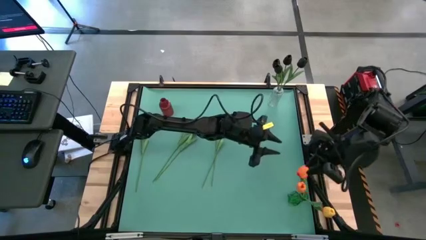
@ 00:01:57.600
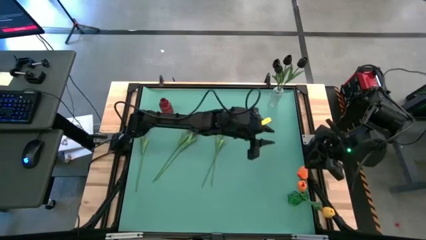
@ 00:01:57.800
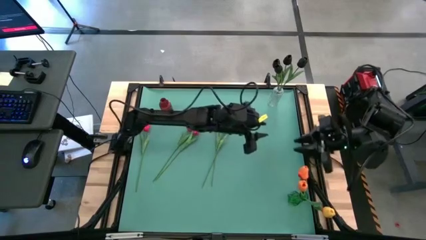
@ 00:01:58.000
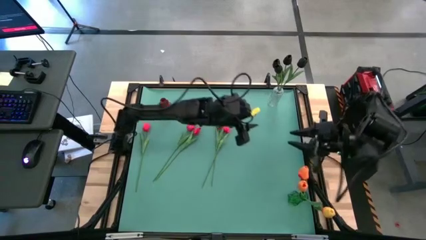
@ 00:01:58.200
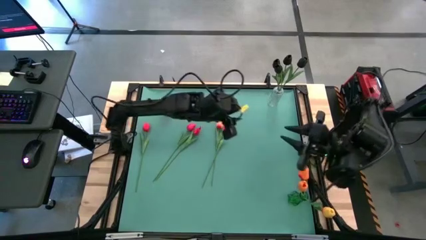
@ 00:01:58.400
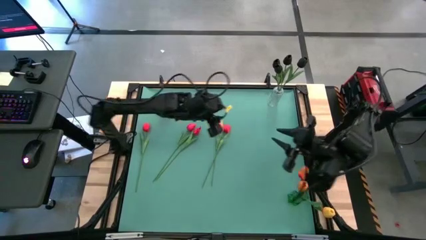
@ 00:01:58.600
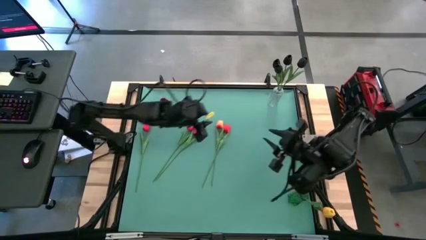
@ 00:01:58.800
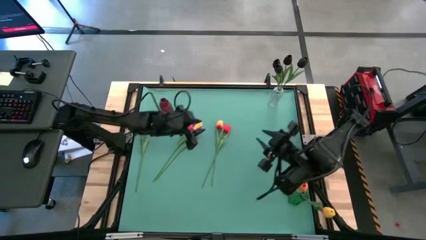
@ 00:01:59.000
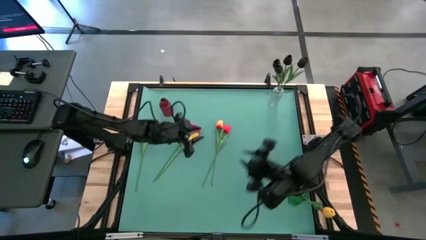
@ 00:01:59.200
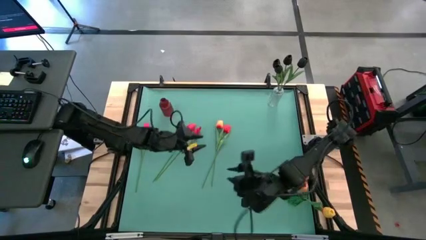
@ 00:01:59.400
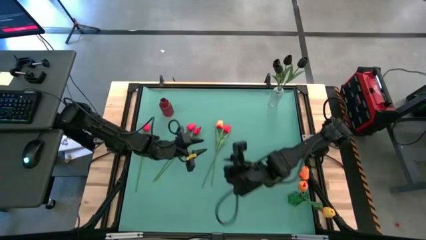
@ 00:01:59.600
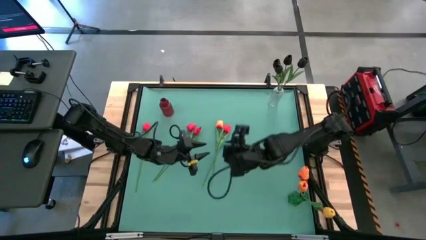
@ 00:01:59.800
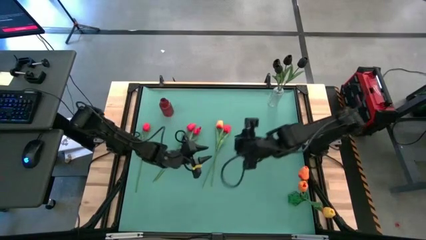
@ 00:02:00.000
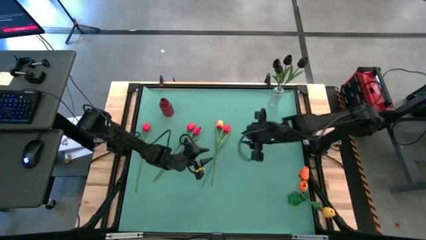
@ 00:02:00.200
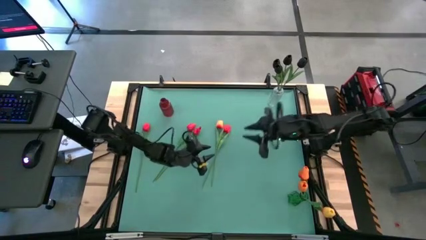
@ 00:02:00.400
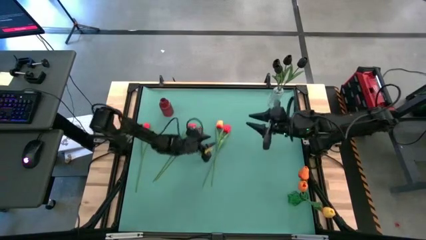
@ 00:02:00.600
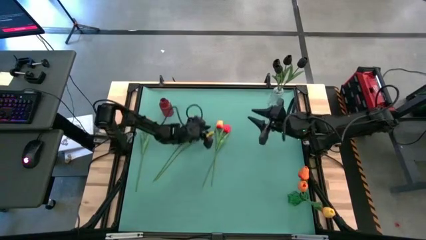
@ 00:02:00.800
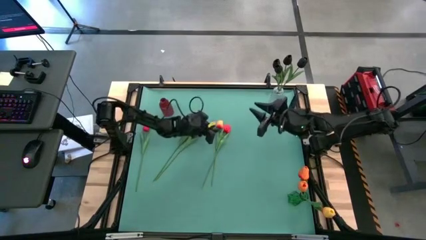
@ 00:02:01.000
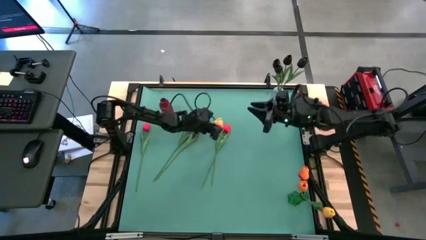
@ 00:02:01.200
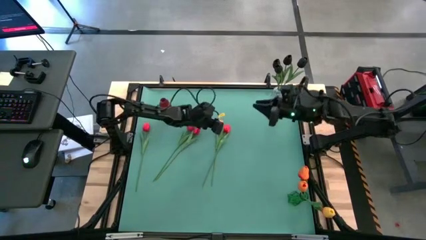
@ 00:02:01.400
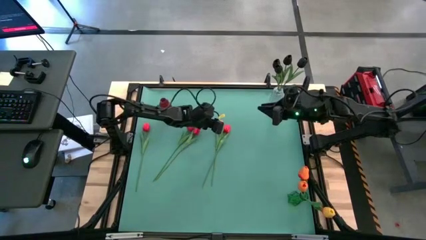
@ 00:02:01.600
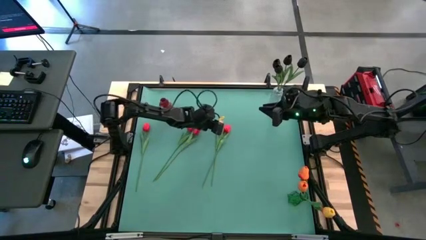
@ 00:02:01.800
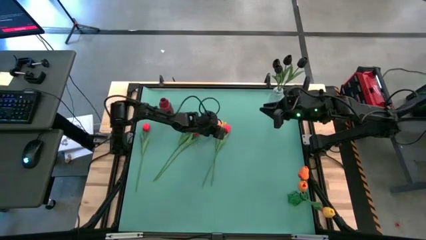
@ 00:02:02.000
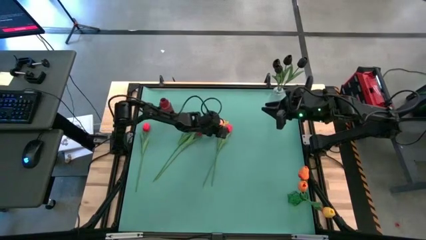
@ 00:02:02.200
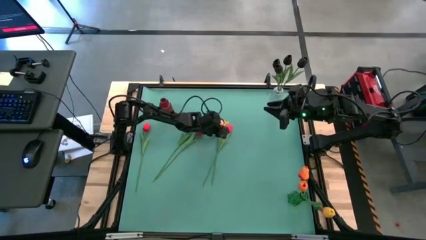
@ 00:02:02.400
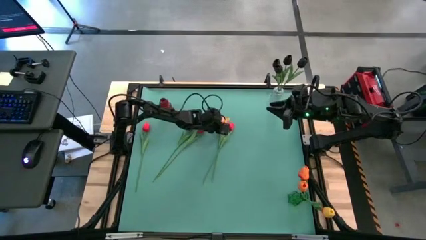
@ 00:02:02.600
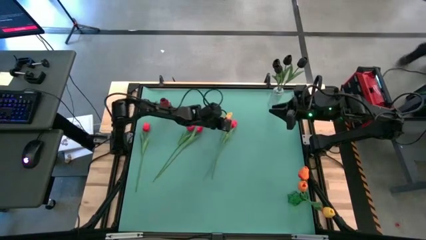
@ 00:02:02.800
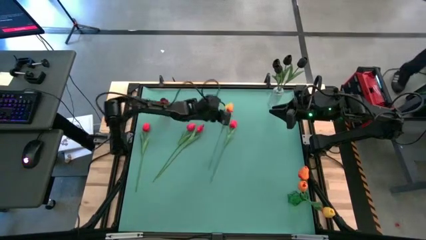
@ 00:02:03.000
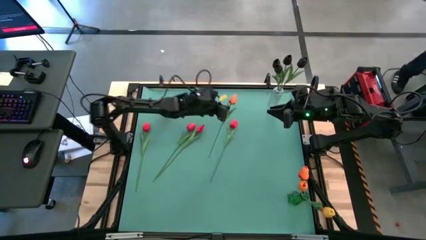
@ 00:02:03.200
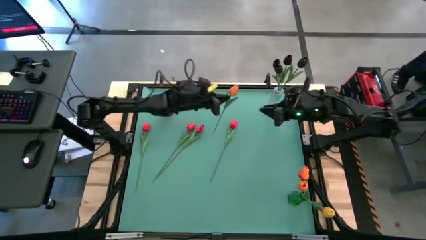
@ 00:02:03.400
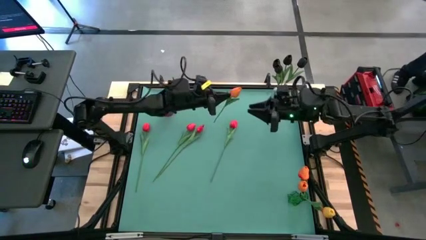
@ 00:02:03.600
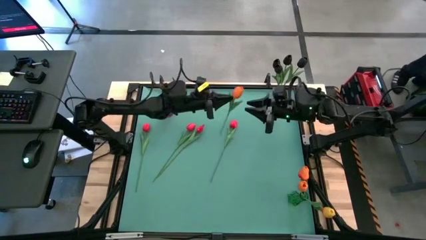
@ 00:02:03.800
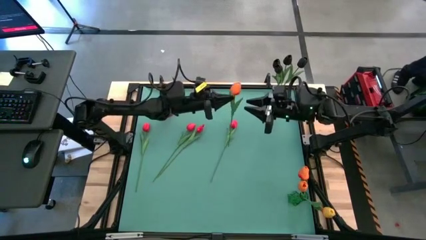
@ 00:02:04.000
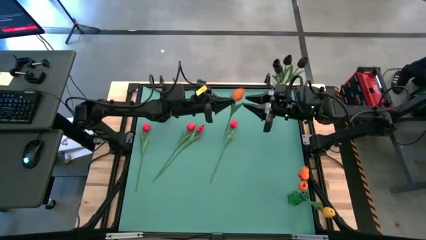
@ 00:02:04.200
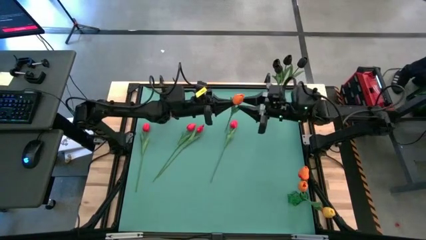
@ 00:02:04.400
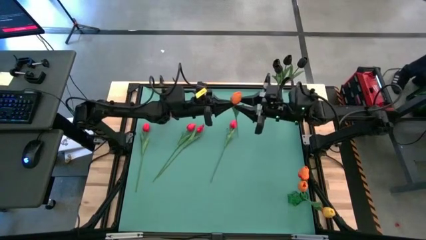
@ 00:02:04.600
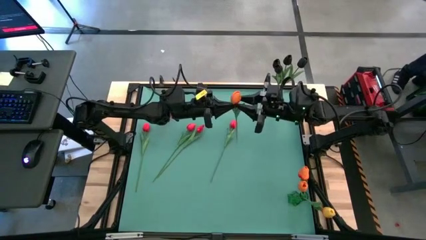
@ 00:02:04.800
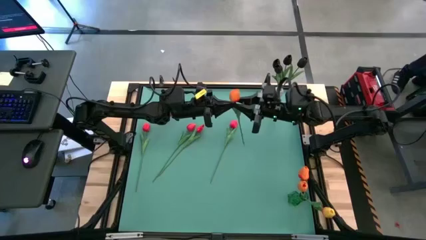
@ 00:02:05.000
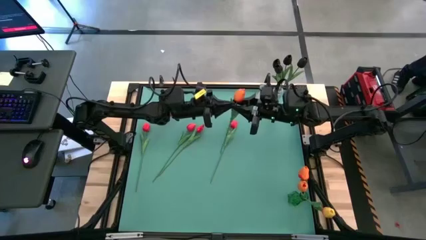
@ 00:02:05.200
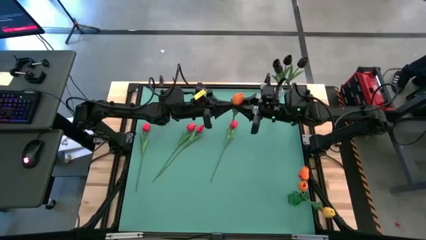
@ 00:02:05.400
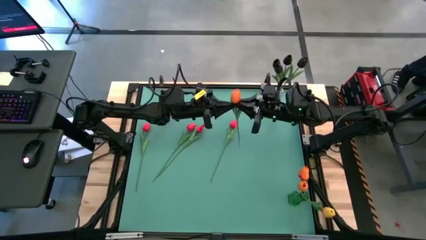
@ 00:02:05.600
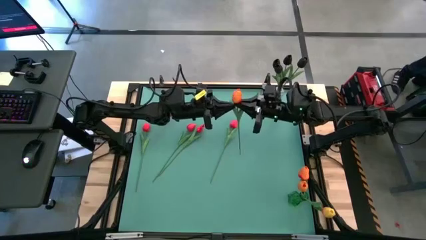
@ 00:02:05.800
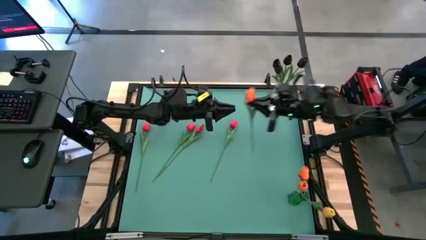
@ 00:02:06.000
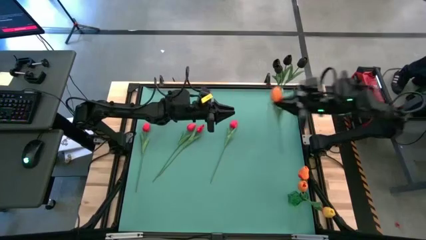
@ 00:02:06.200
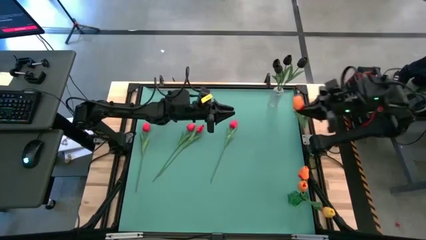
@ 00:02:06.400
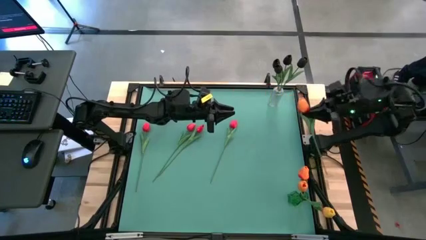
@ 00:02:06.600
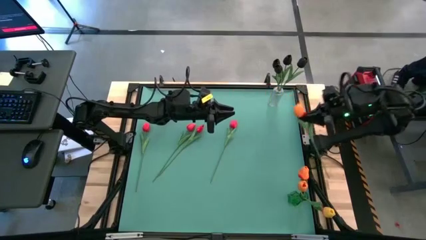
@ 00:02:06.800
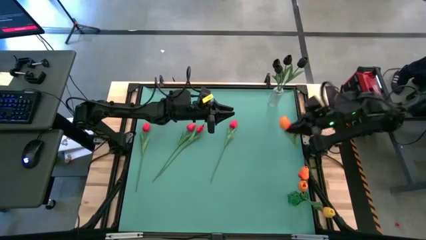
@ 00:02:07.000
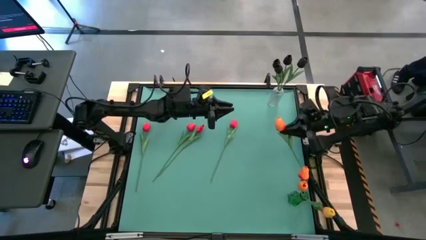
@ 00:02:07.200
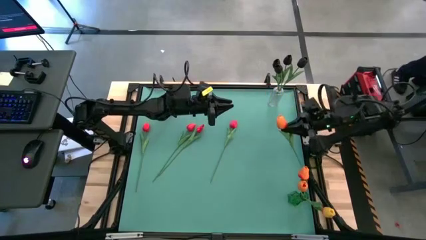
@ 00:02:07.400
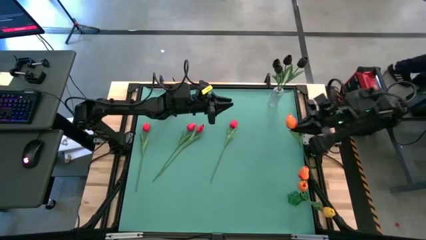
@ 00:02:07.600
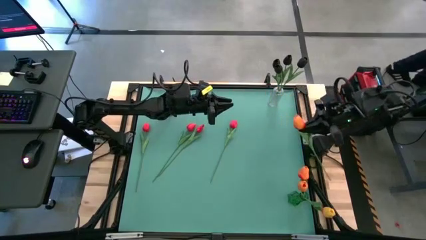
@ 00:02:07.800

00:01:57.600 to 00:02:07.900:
Task: Sort flowers into vase by color
Put the orange tulip into the green vase

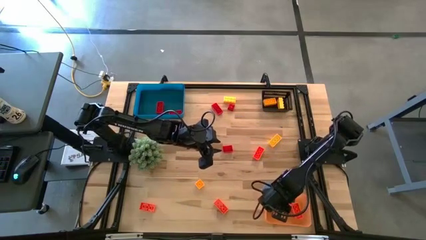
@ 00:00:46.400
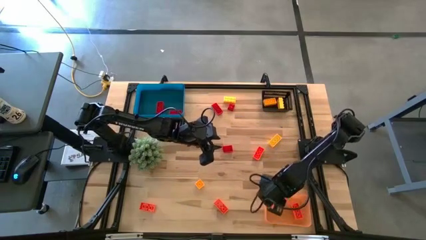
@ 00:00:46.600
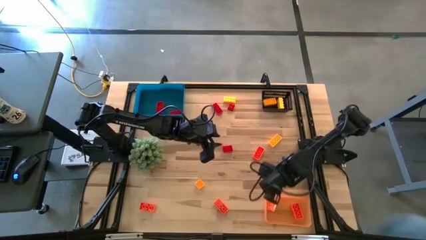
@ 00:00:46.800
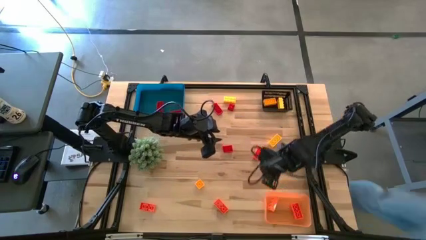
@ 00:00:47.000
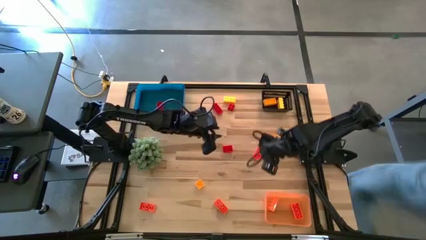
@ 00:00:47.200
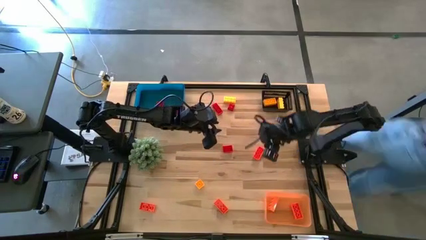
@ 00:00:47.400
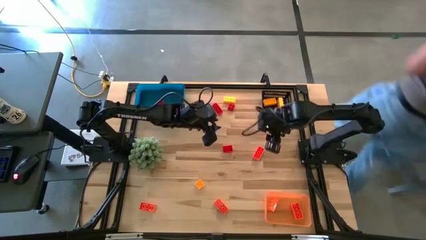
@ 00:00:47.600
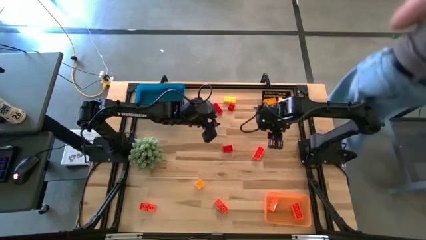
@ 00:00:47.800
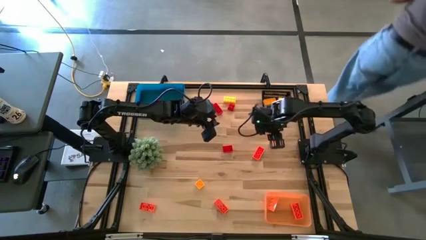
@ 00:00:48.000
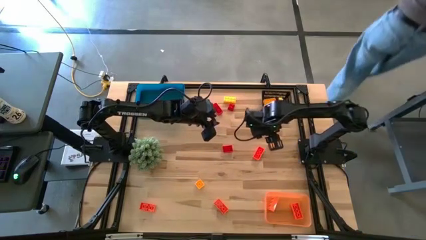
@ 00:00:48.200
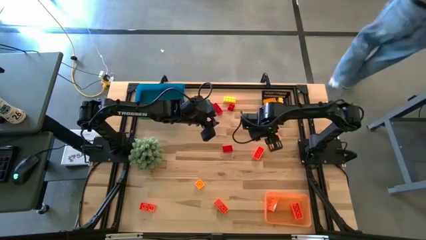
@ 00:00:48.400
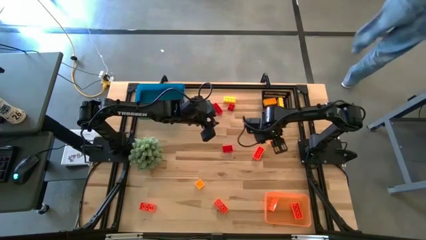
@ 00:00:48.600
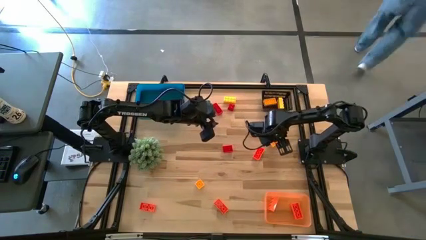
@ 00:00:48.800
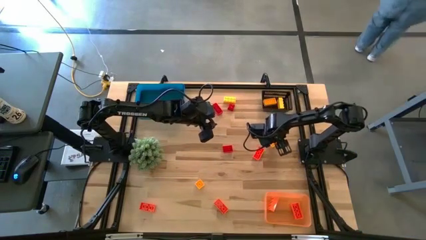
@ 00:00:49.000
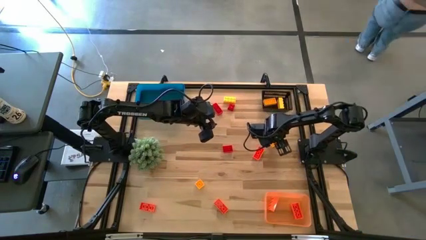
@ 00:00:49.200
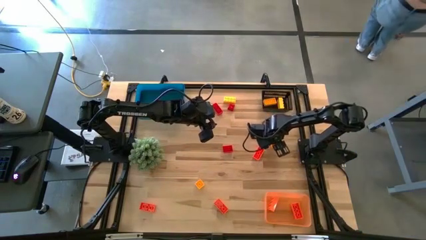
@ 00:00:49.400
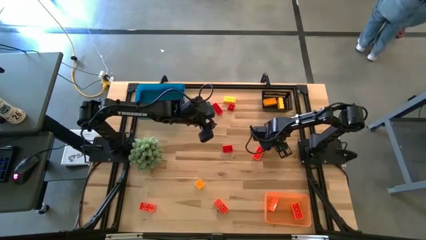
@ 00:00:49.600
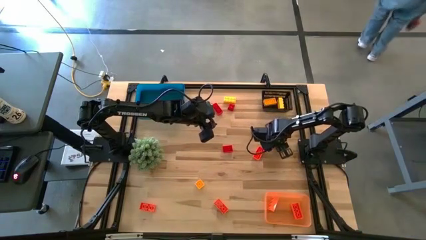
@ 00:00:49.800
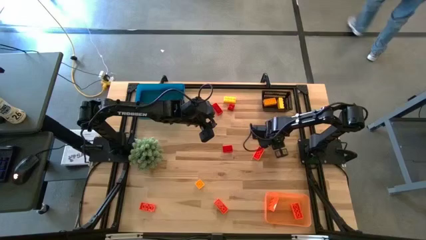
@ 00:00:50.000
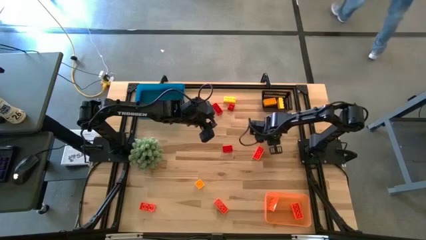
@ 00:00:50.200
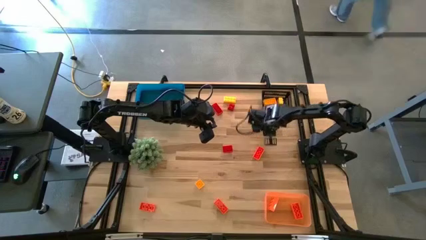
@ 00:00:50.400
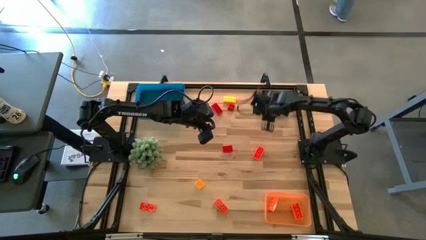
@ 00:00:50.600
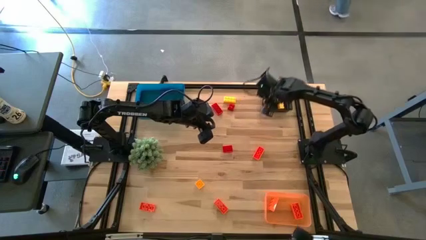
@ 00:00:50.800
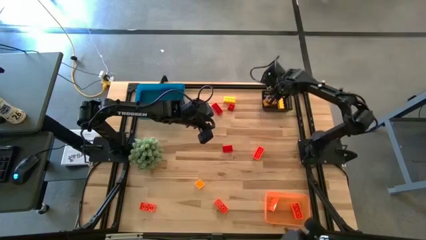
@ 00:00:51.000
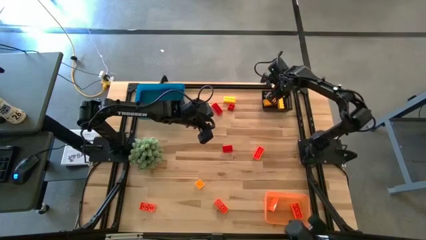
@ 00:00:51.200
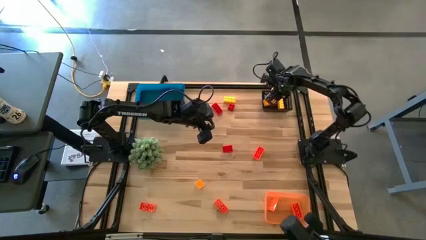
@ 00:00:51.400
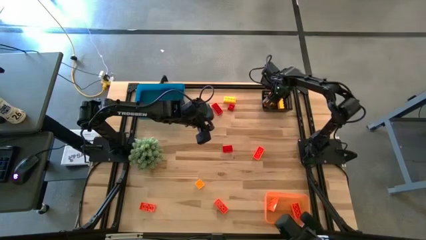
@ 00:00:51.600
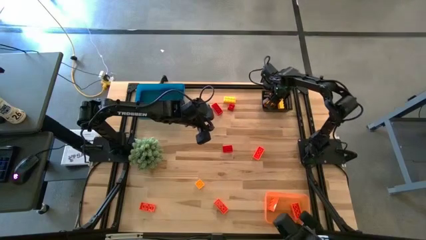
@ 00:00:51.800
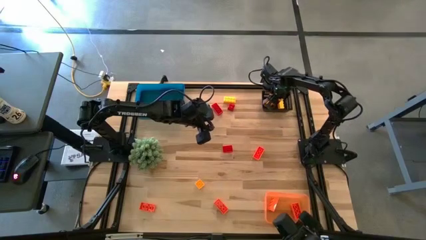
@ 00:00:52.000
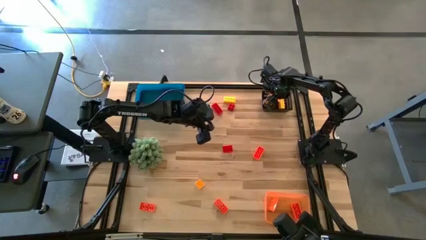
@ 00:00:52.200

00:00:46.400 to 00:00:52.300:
Task: Sort & place blocks by color
Put the yellow game piece into the black bin
